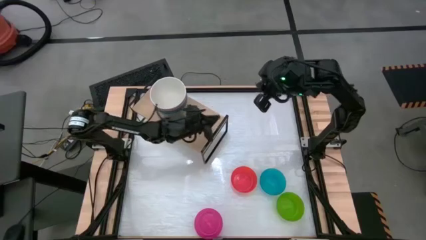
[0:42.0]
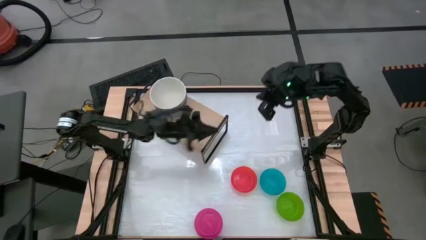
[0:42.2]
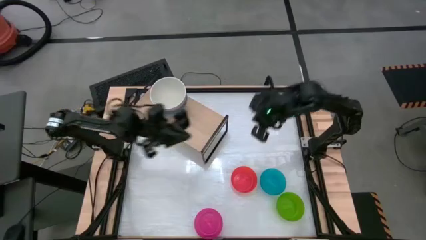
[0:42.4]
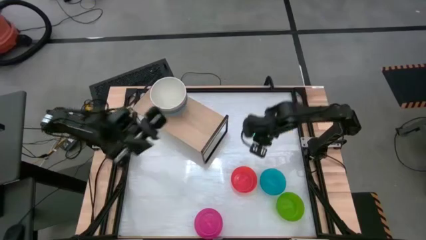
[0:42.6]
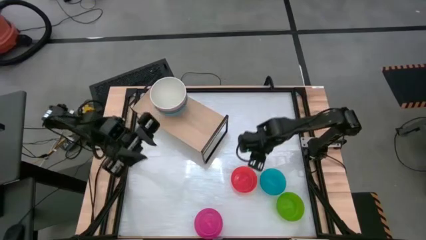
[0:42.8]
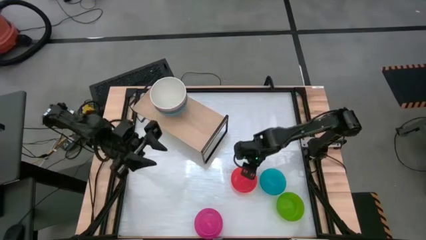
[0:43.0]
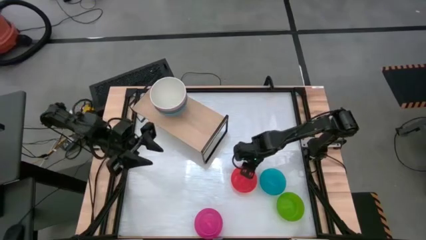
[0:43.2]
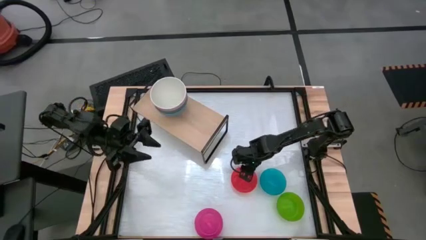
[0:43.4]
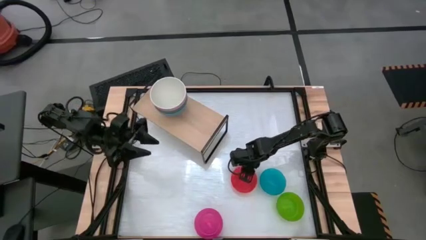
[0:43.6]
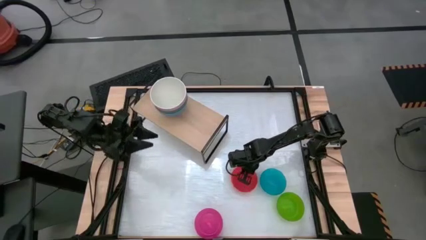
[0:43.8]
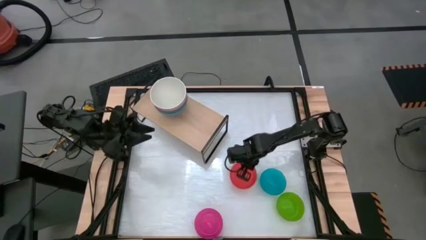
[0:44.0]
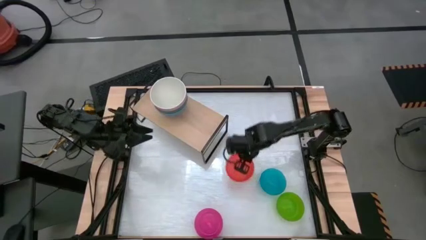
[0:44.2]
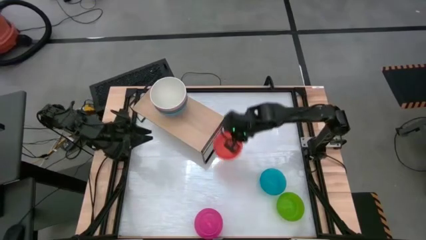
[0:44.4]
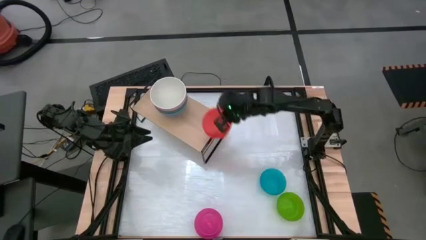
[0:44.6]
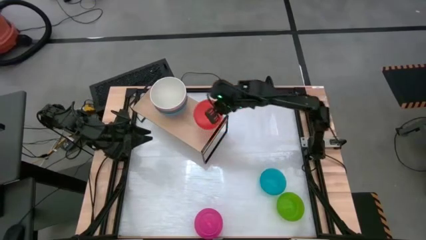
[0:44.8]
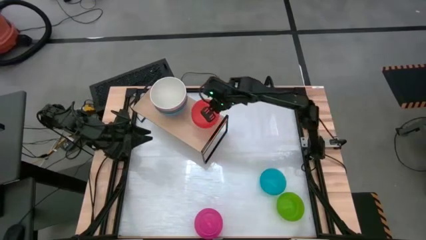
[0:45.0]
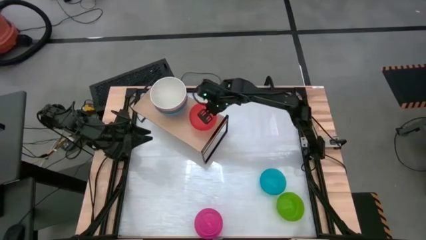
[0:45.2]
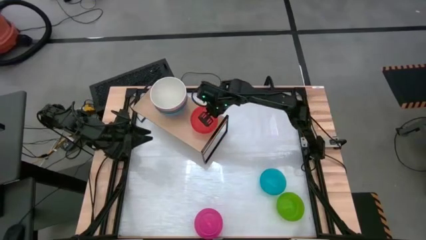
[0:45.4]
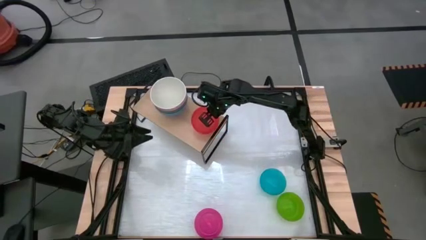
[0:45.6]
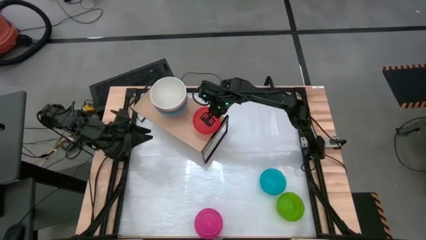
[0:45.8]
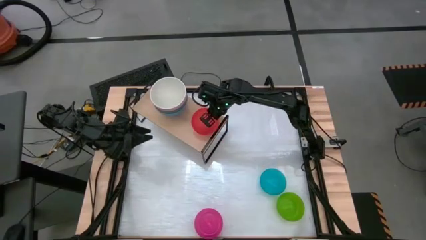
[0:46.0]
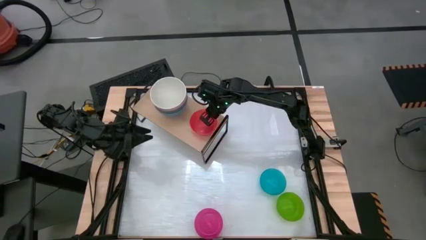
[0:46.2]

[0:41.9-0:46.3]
Task: Place and stack bowls onto a shelf
Put the orange transparent bowl on the shelf

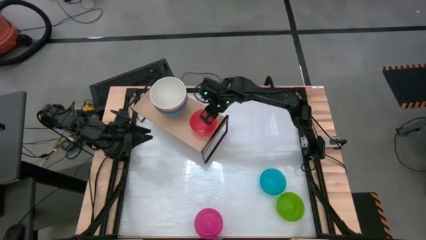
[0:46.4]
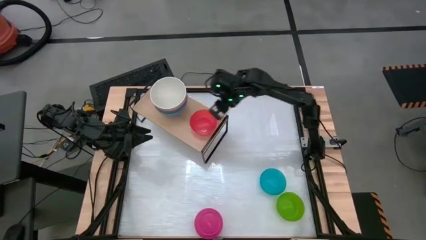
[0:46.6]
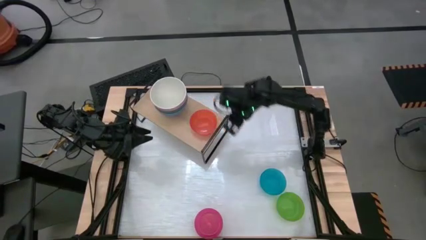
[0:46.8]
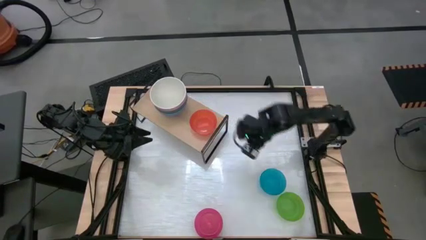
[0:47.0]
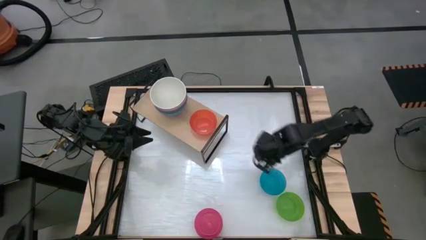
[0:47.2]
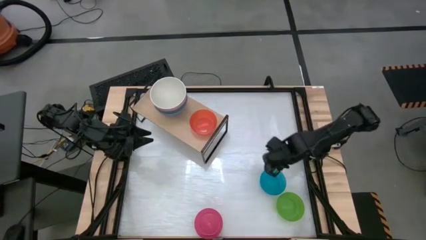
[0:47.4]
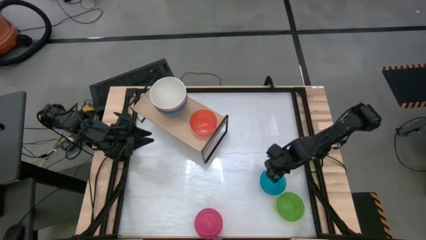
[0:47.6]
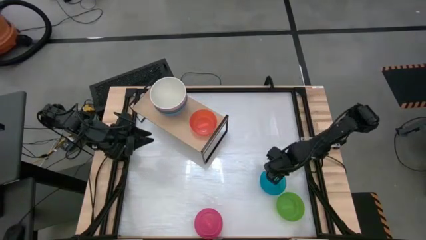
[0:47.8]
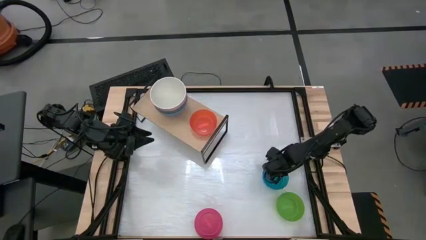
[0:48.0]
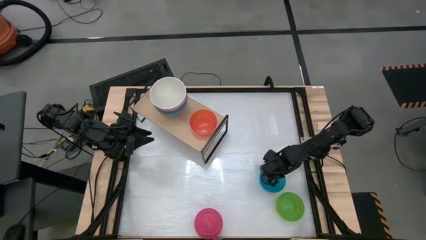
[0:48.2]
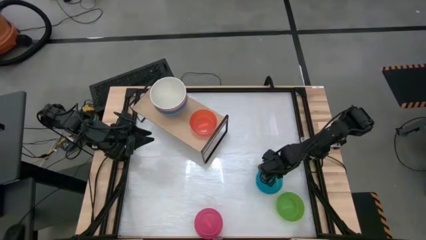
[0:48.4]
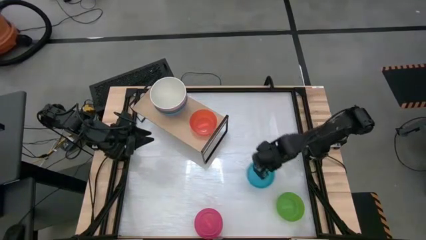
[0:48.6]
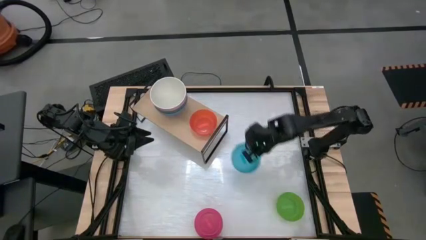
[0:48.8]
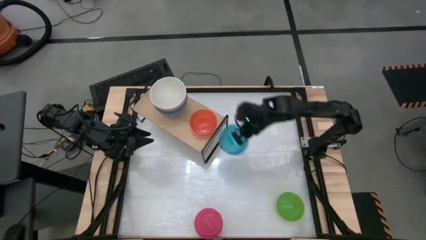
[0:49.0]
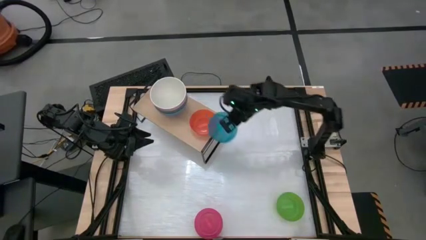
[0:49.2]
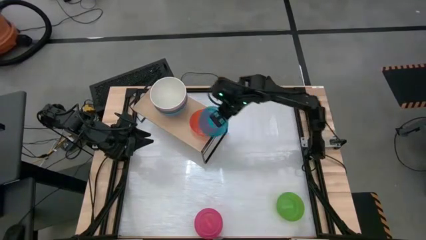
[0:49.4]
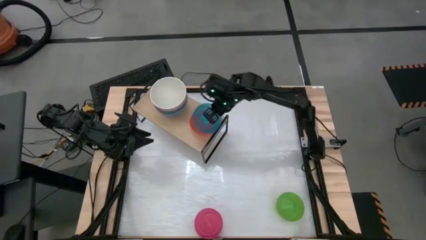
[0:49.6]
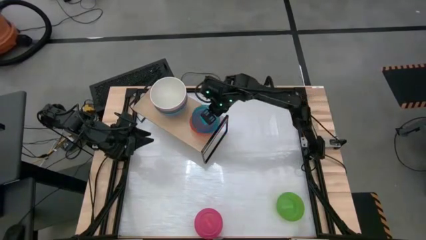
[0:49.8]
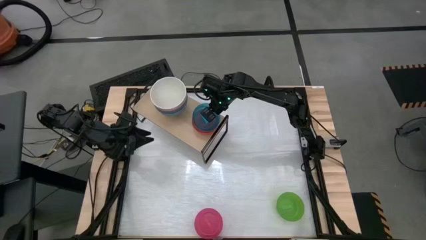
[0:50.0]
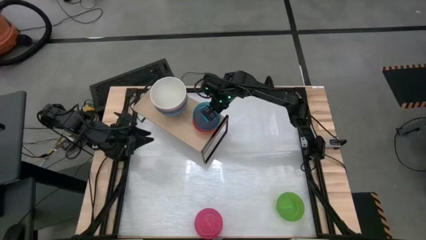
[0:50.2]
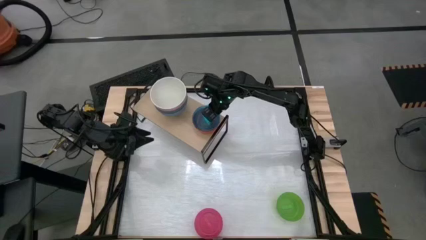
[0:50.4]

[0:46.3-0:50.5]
Stack the blue transparent bowl on top of the orange transparent bowl on the shelf

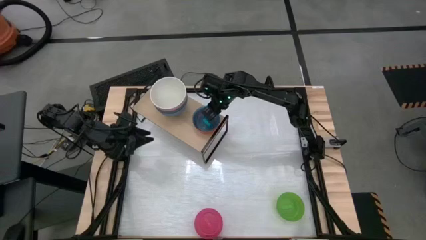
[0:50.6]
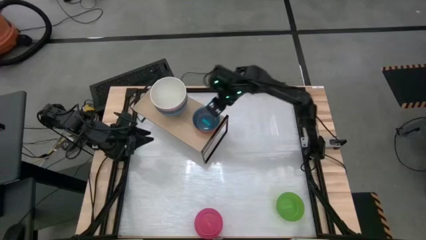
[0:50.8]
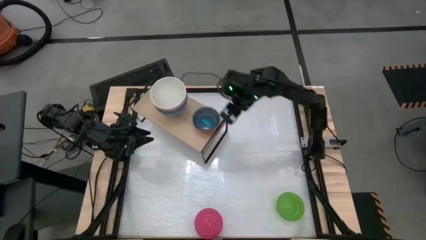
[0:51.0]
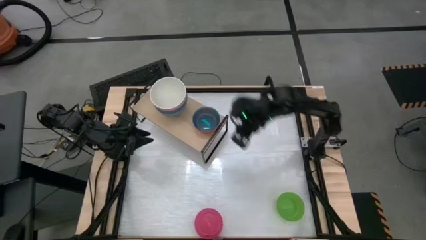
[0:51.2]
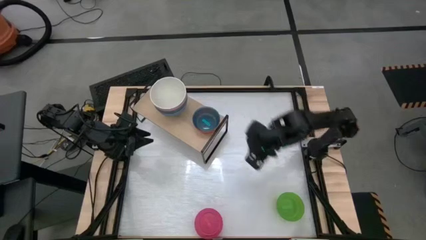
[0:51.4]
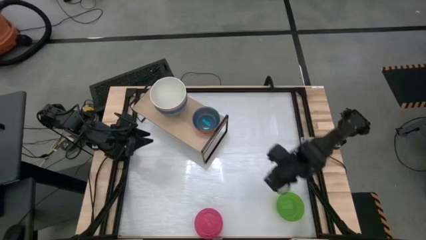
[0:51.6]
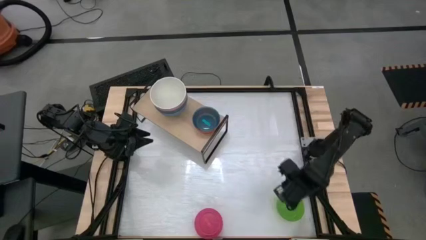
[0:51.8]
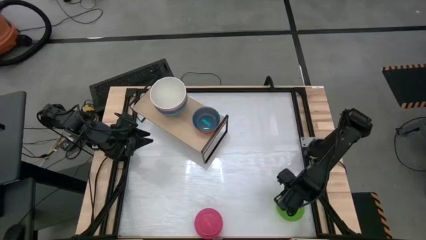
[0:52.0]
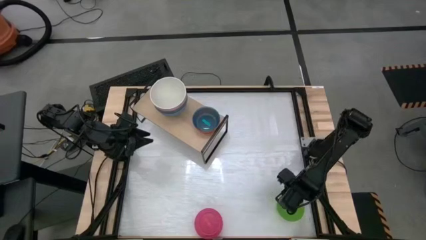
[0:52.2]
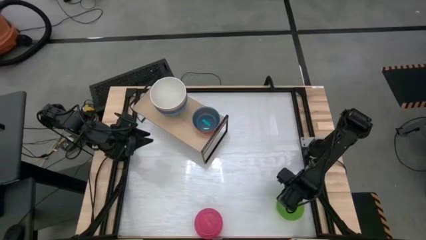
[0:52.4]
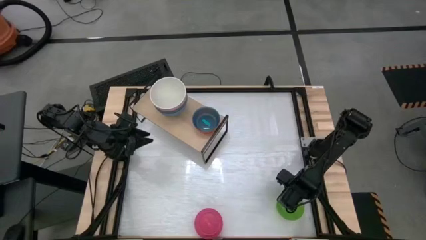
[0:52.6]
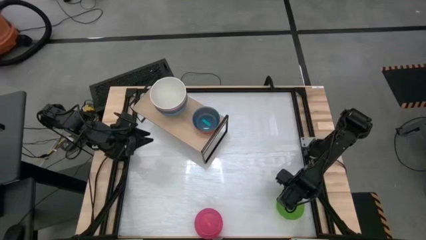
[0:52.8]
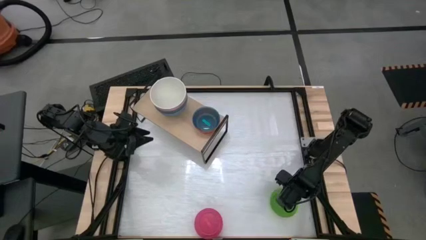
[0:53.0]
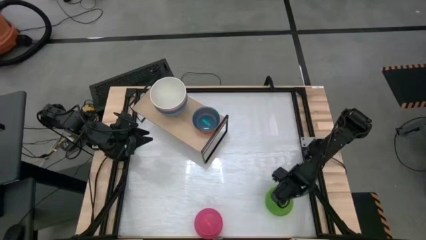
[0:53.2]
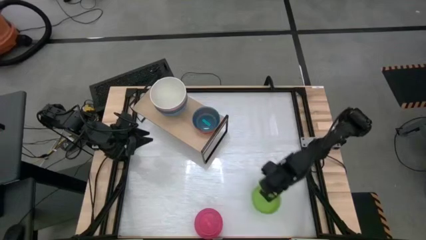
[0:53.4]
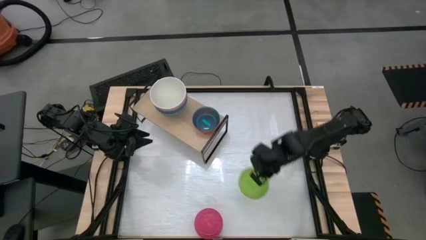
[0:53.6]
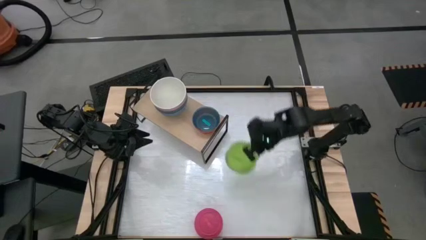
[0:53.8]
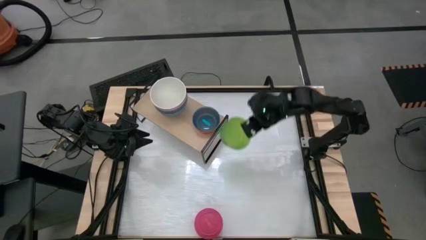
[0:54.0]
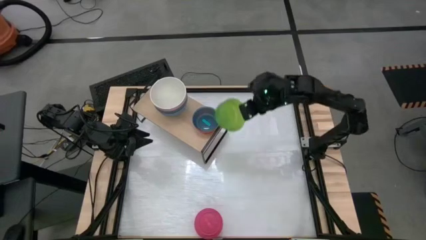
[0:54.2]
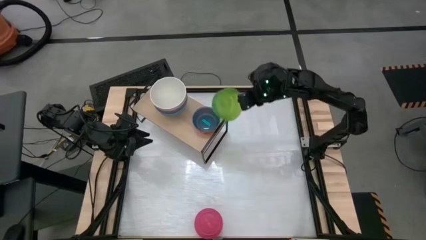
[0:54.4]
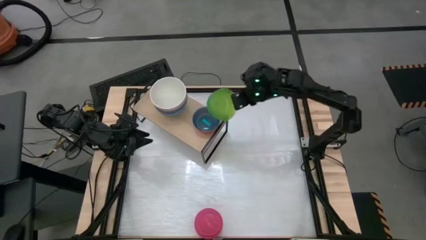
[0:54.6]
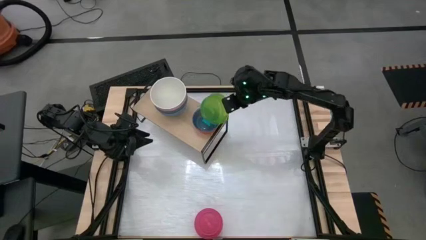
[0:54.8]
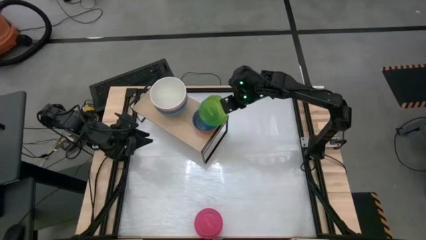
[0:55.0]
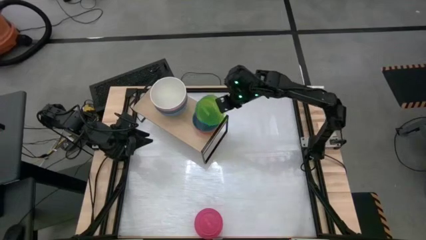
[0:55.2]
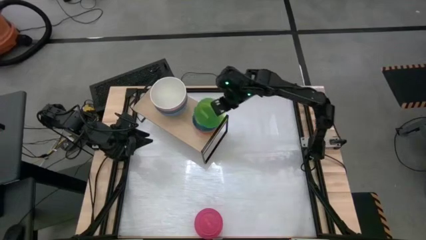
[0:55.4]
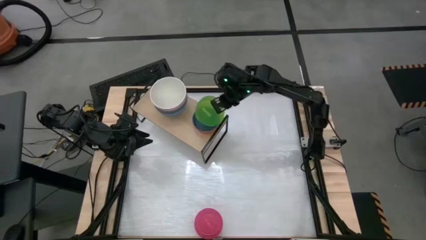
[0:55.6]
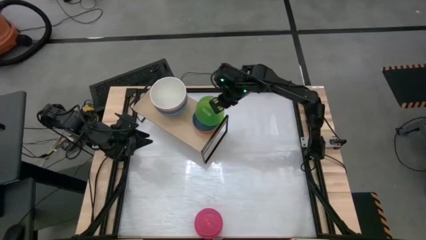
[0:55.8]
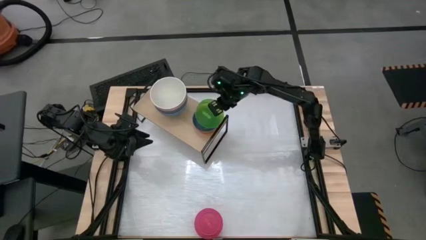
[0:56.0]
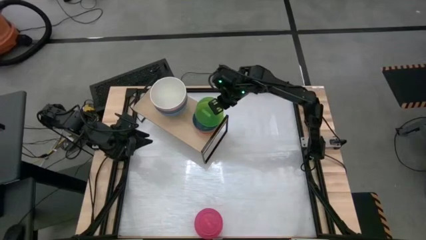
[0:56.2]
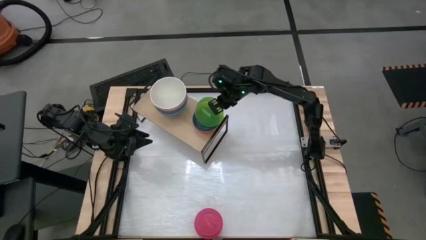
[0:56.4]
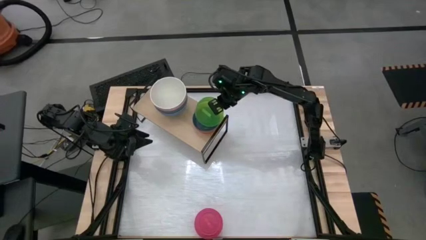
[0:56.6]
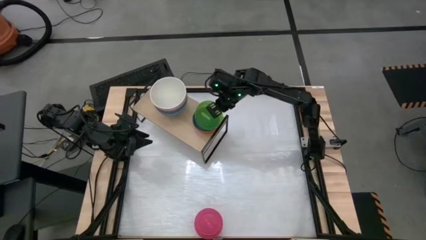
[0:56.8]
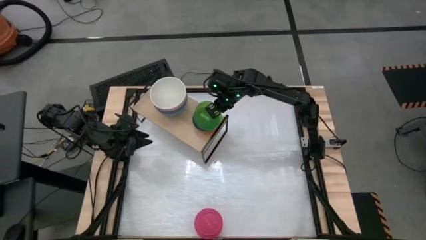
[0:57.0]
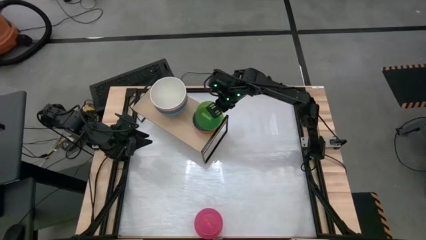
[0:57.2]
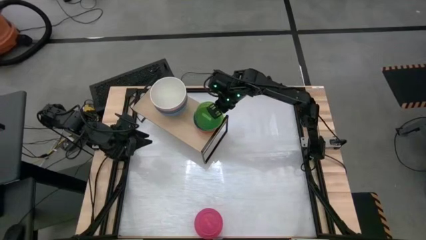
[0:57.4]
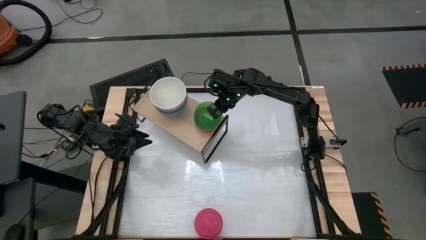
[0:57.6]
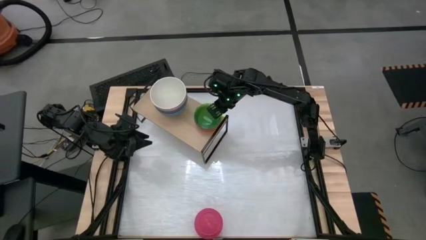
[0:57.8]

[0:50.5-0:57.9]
Stack the green transparent bowl on top of the blue transparent bowl on the shelf

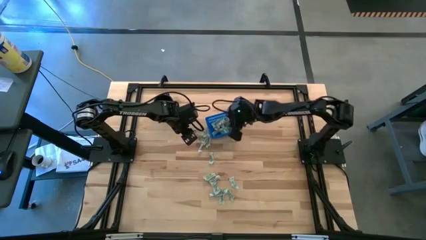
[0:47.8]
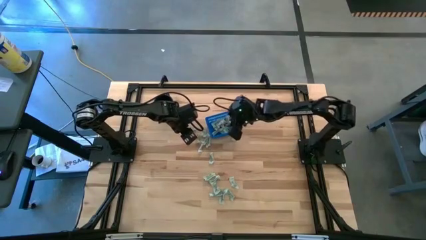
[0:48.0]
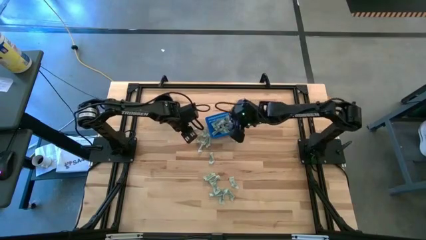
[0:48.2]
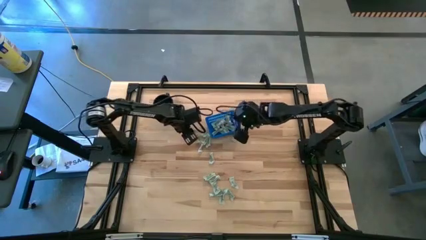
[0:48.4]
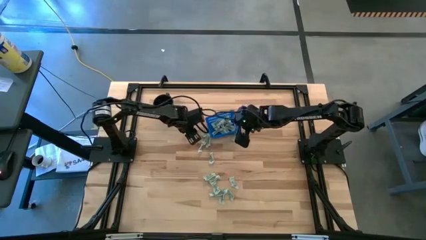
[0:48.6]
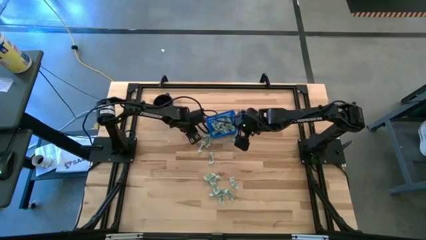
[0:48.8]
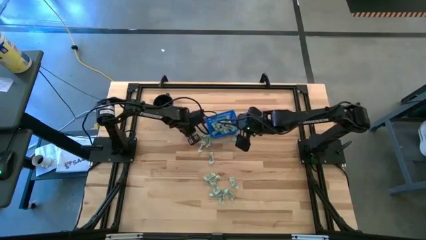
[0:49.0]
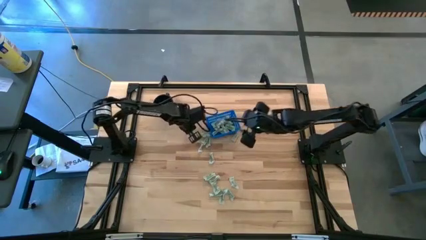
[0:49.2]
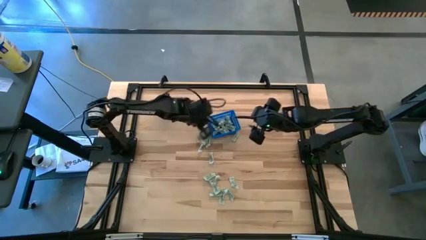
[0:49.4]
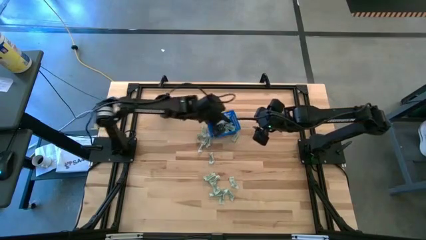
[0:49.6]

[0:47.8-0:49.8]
Task: Pick and place Stevia / Truvia into bins
Put the green stevia packet into the blue bin
